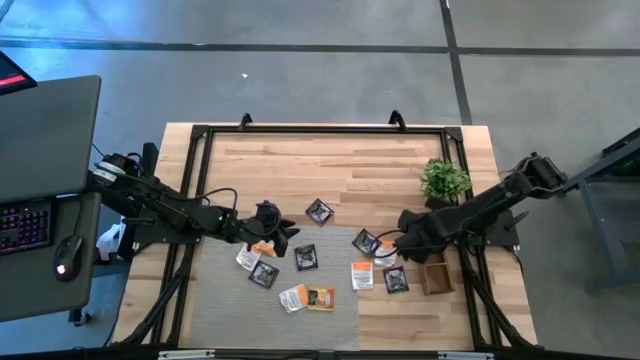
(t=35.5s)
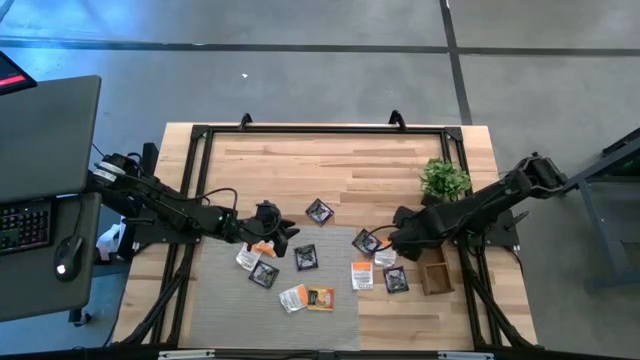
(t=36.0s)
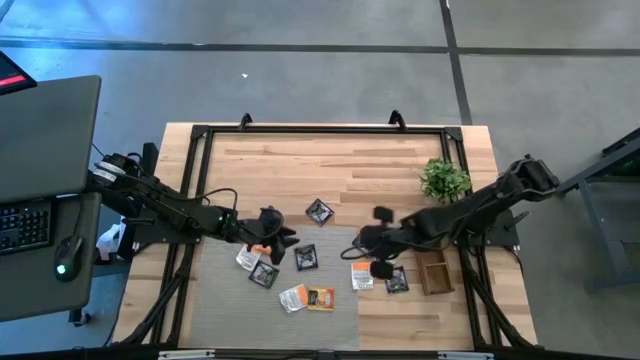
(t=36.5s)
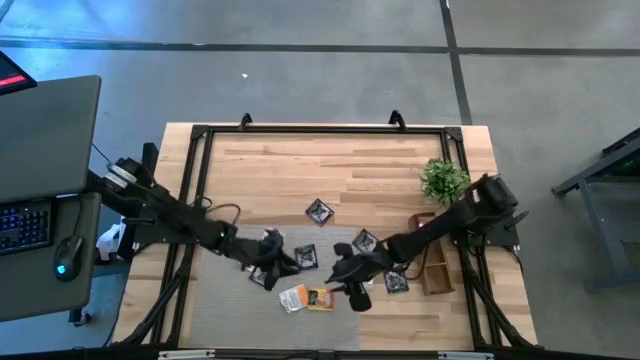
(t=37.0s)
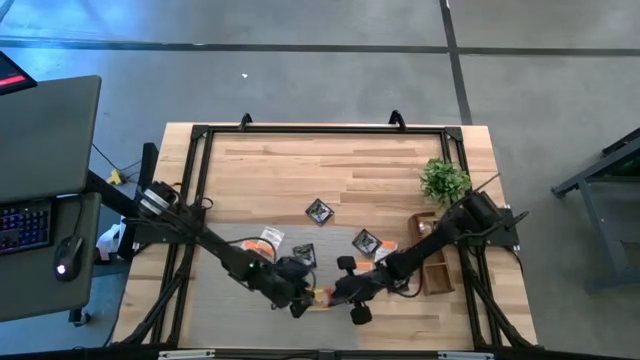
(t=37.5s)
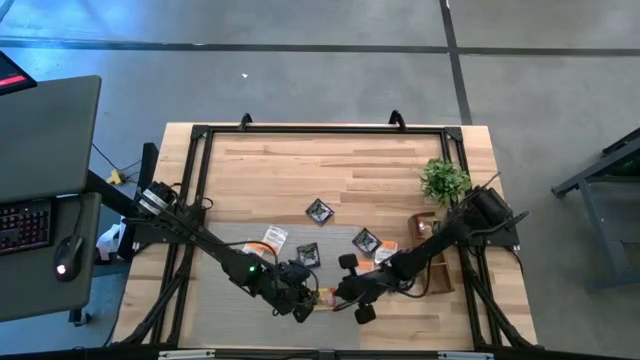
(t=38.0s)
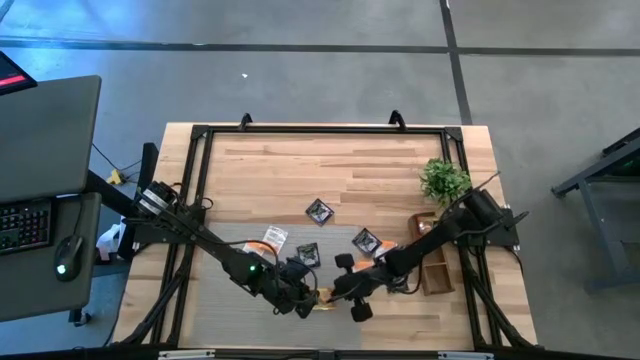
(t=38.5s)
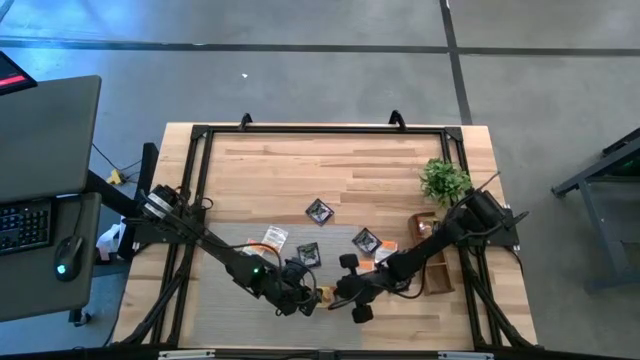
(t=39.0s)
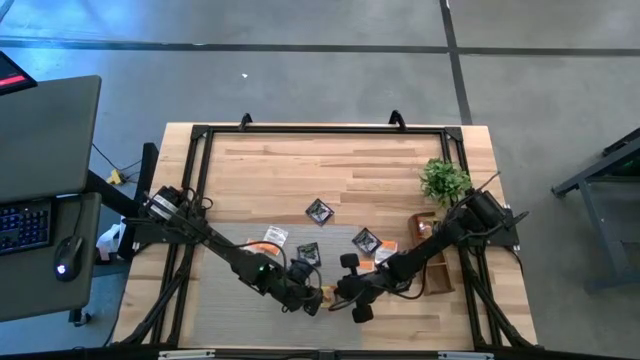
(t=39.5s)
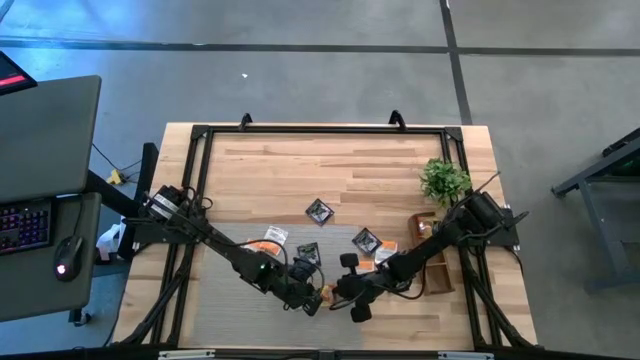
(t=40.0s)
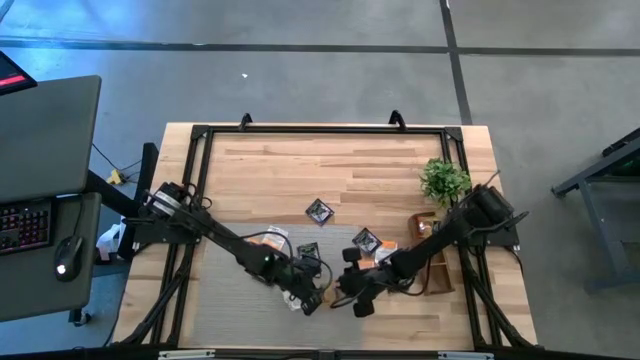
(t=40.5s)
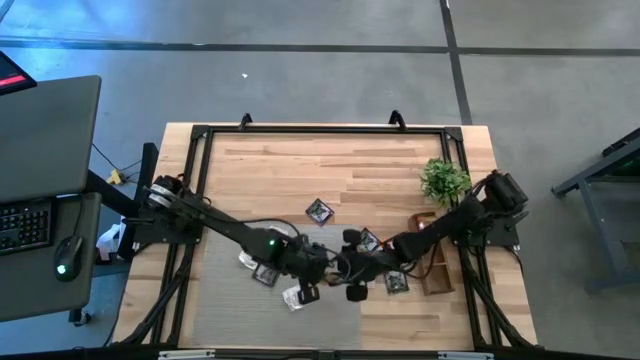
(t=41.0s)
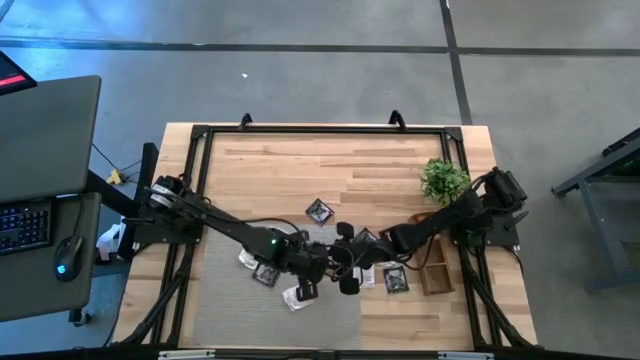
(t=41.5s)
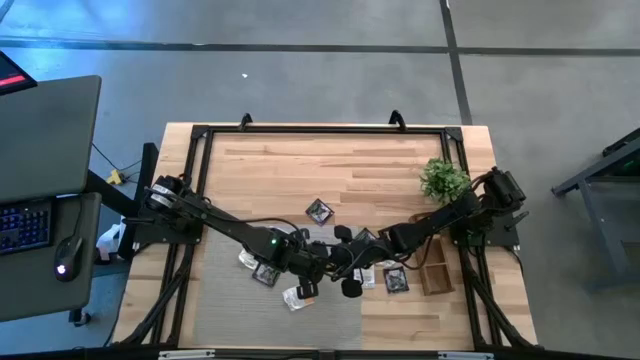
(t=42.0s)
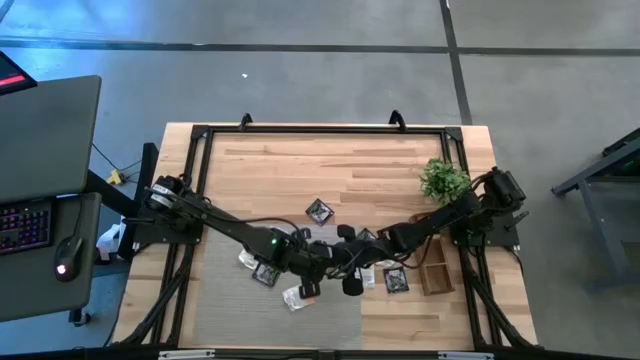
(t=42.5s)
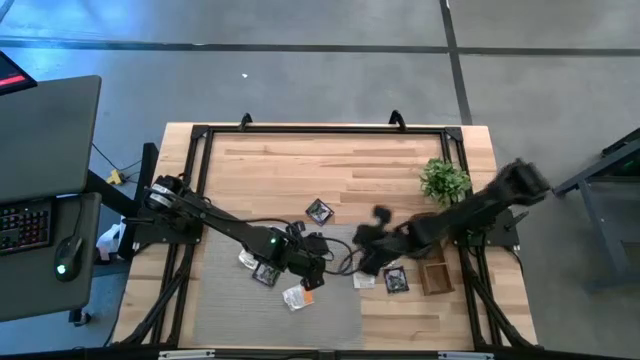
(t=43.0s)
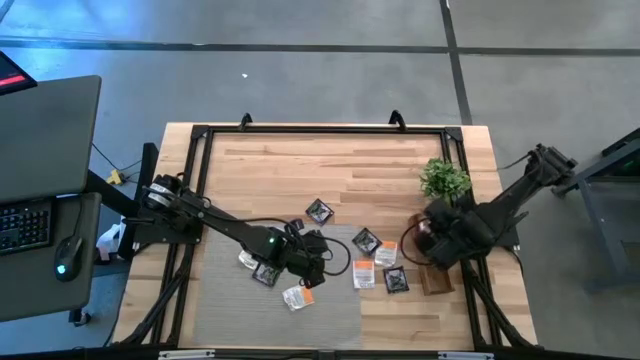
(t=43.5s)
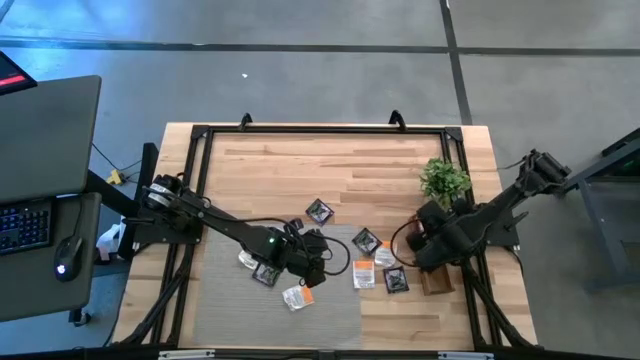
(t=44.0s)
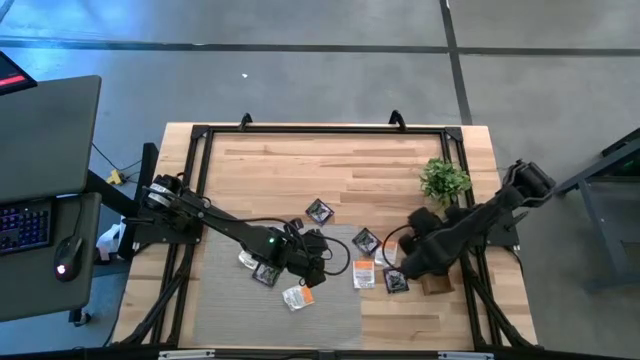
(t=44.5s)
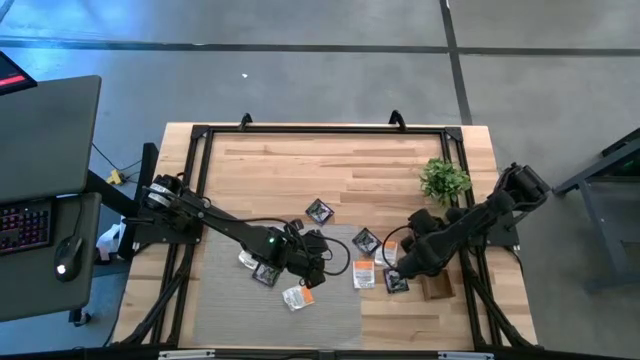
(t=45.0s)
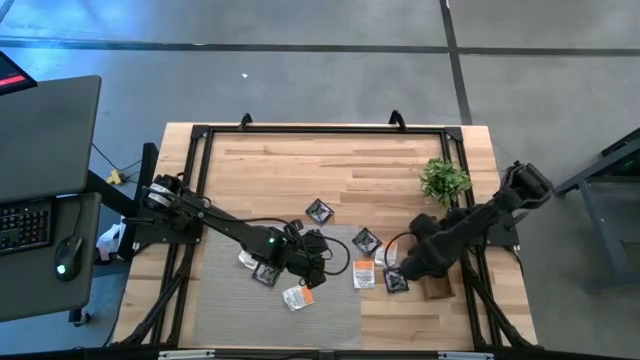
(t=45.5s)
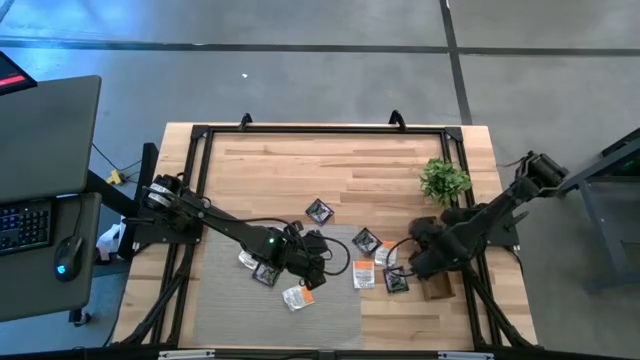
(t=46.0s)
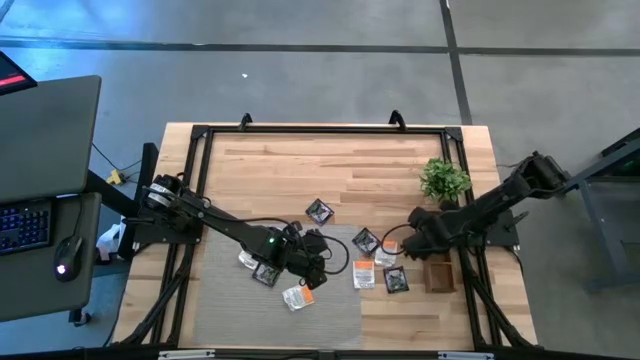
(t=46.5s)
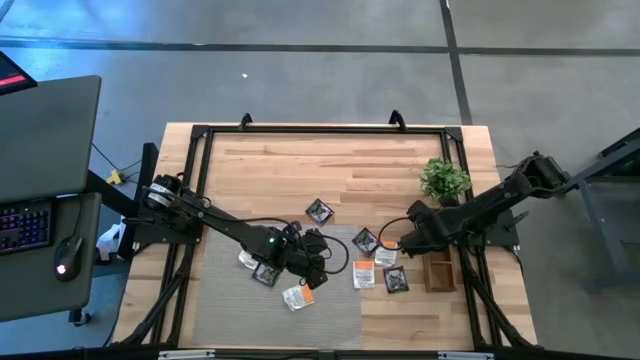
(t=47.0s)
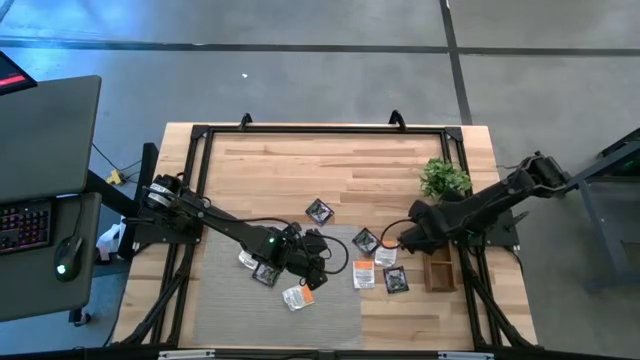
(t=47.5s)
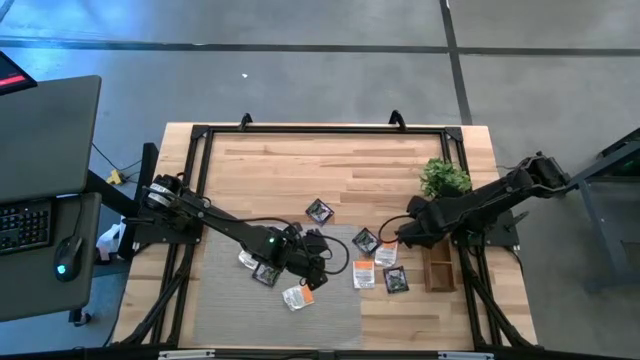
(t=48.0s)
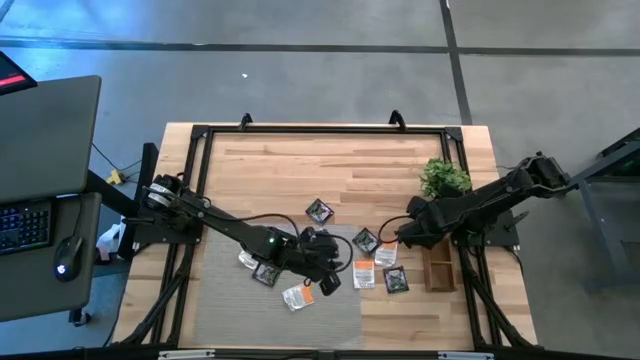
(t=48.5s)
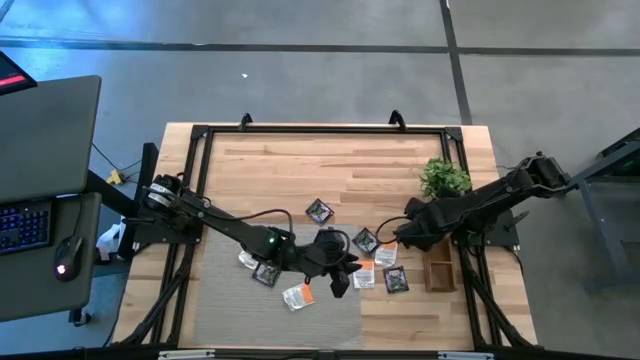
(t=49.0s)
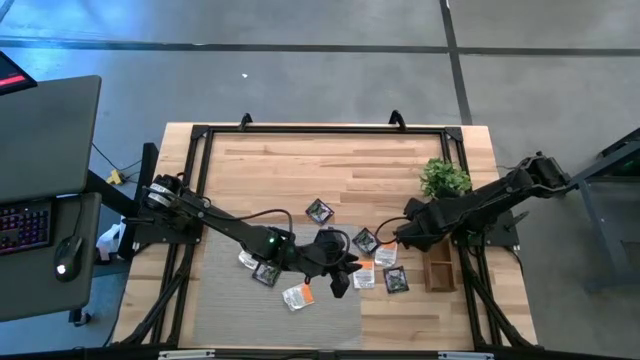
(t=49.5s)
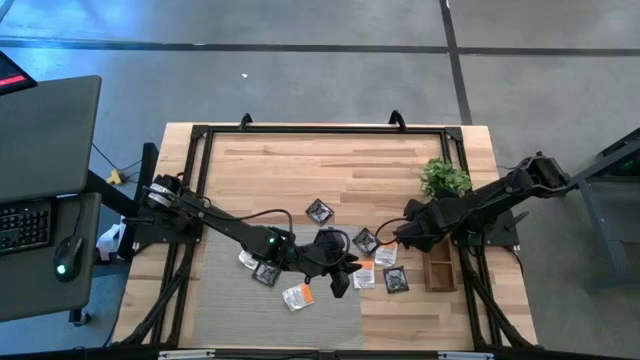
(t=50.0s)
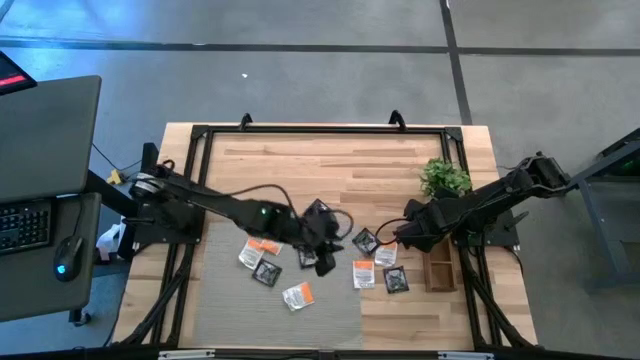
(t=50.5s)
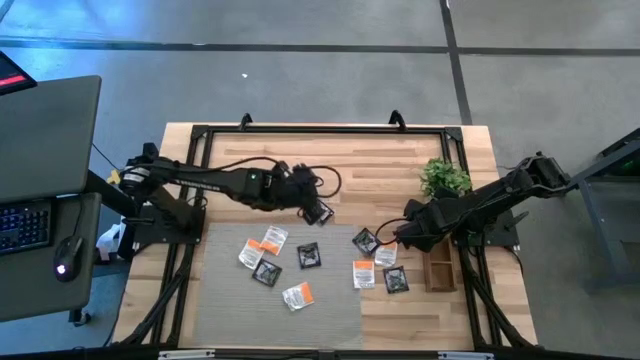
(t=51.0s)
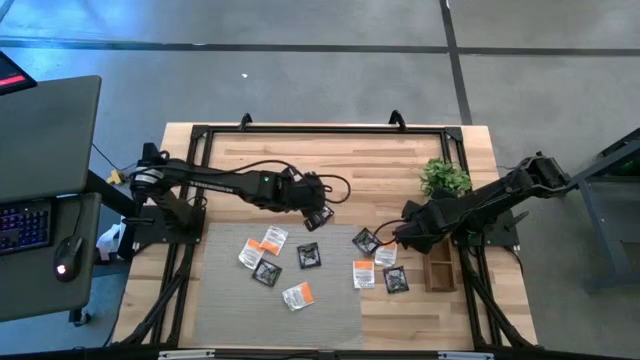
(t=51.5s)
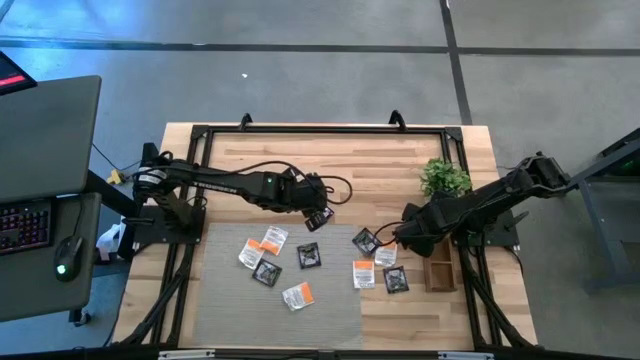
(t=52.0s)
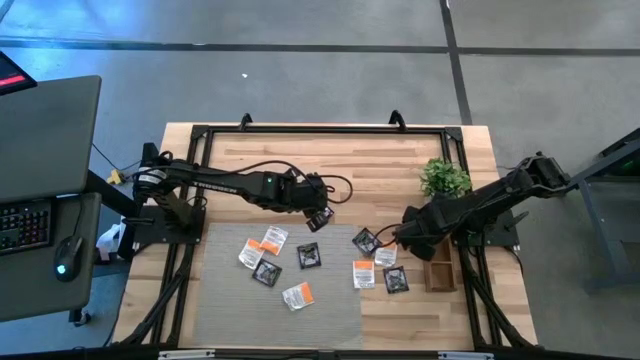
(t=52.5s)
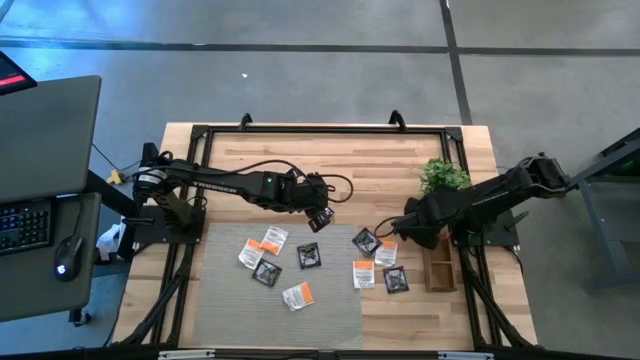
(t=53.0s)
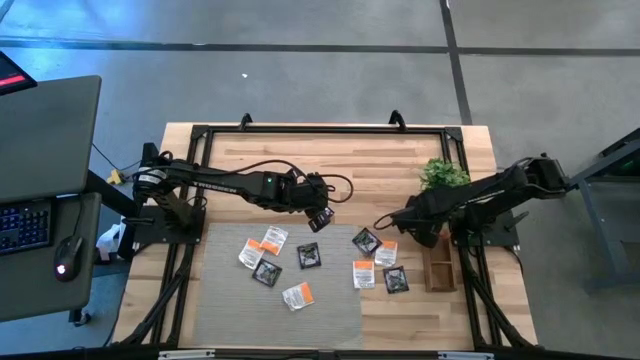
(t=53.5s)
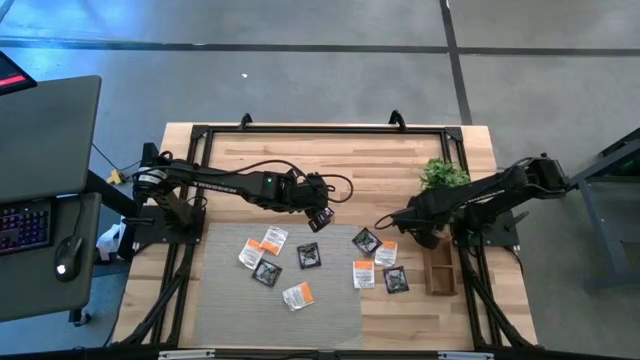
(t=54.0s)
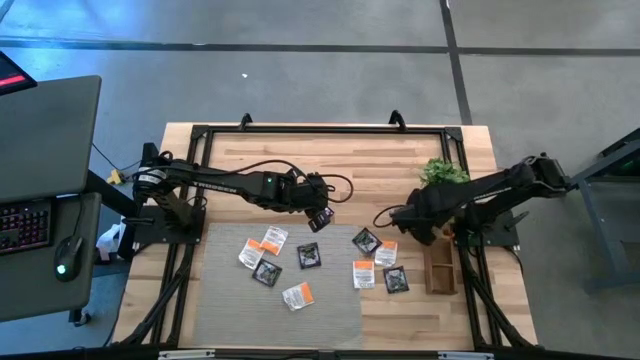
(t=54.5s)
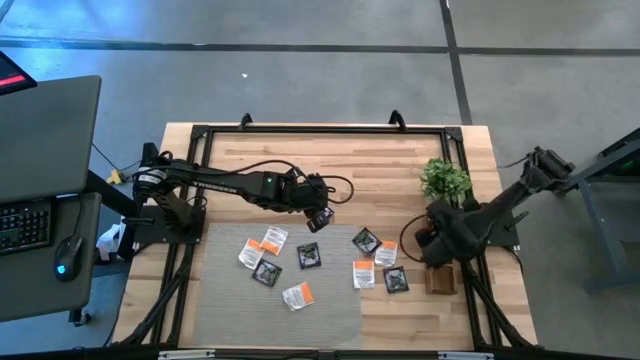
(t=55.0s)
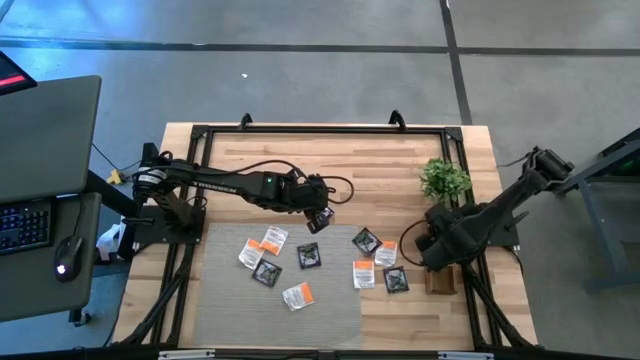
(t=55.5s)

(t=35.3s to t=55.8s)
Task: Pick & Place Tea
Put the orange tea bag into the top section of the wooden organizer

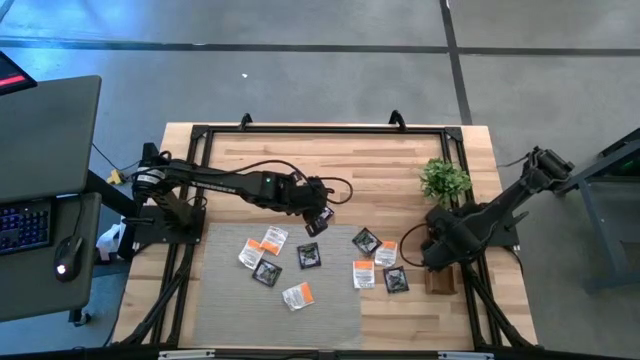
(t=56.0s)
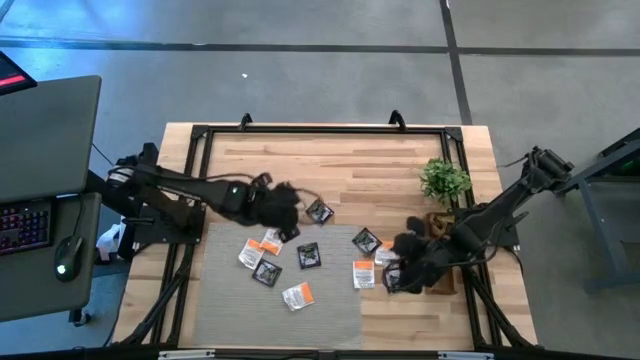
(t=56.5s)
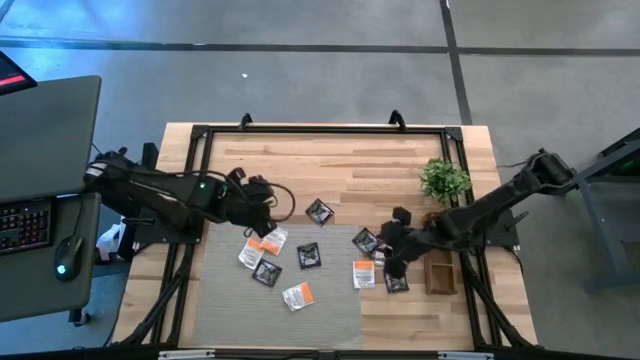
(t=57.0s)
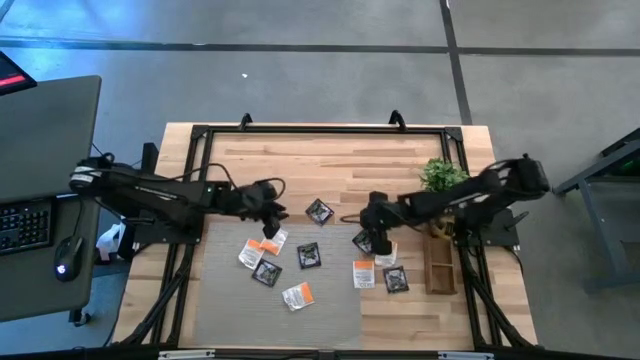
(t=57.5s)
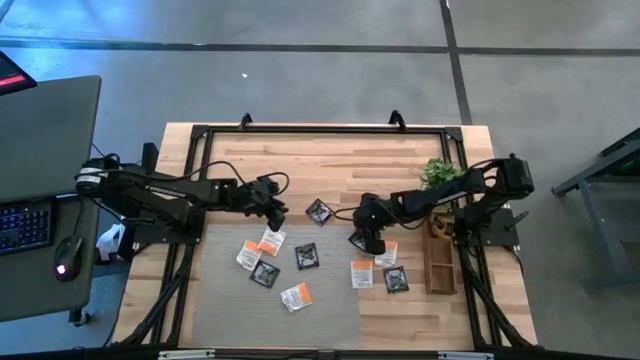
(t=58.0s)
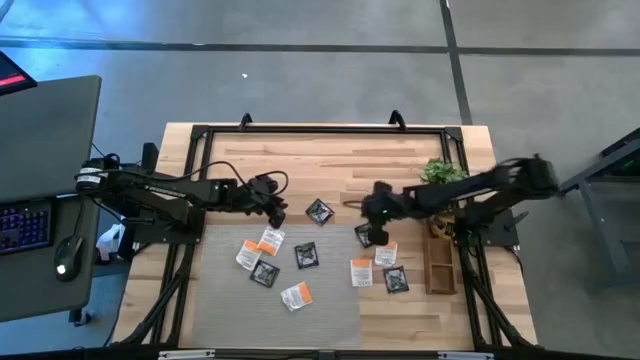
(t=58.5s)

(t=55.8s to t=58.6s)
Put the black tea bag into the middle section of the wooden organizer
